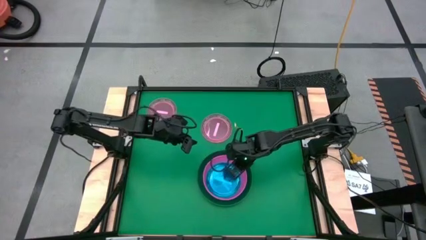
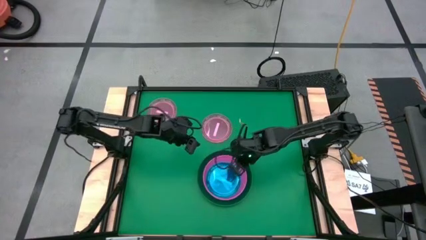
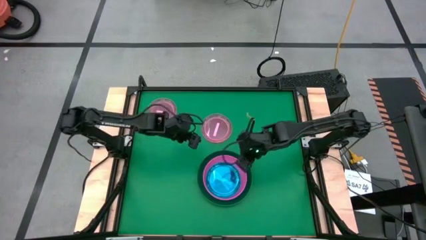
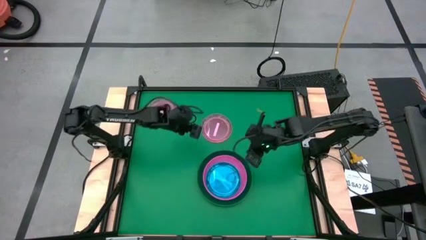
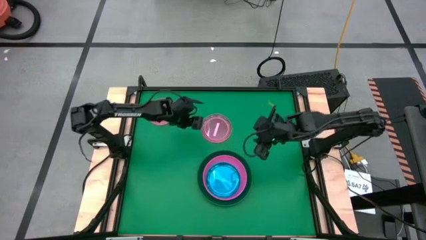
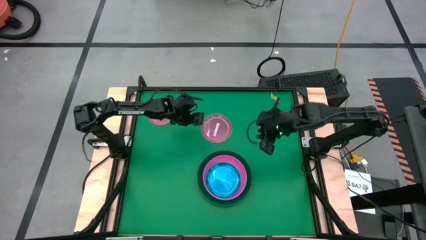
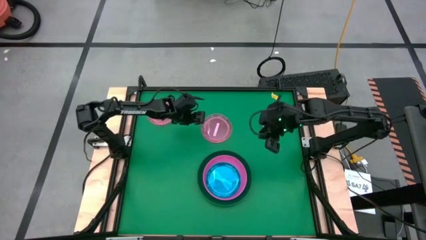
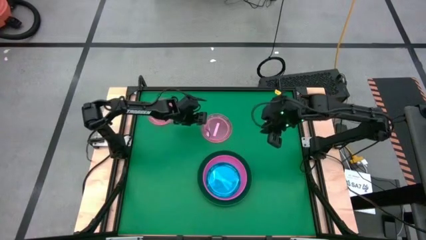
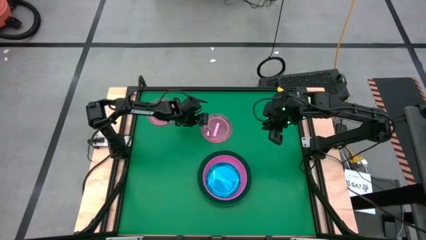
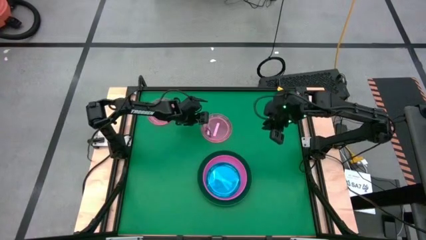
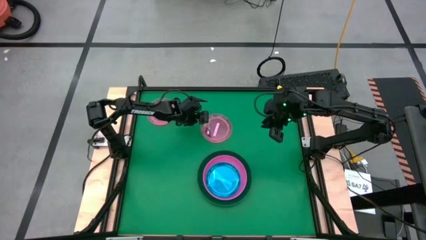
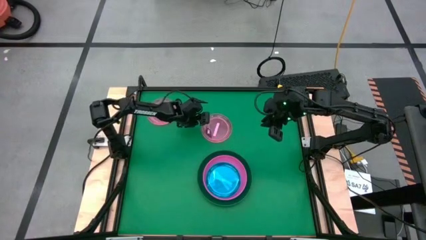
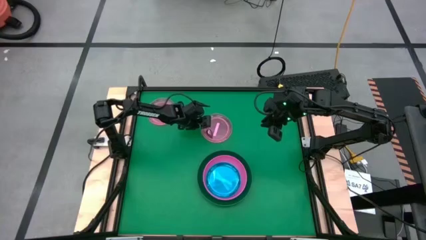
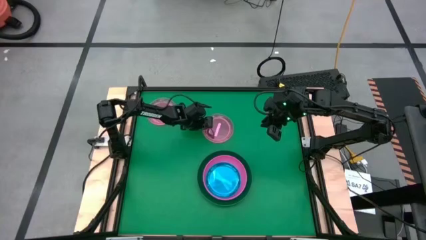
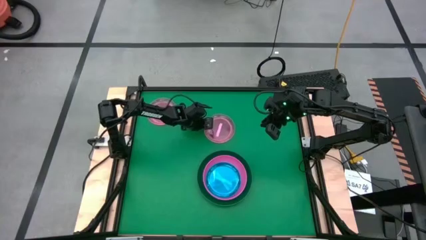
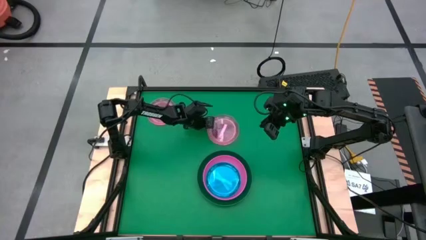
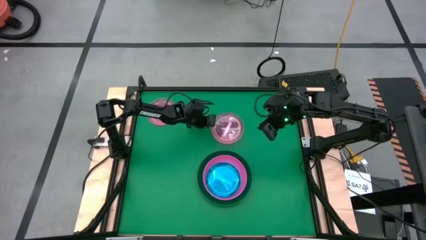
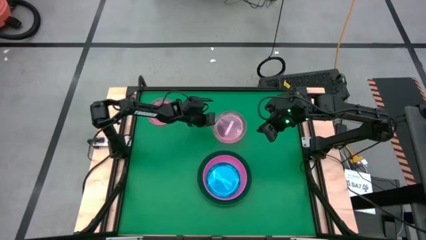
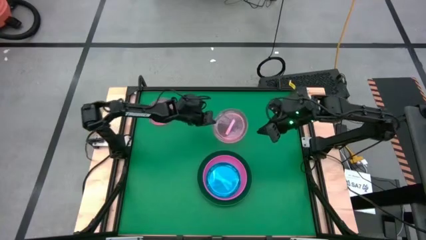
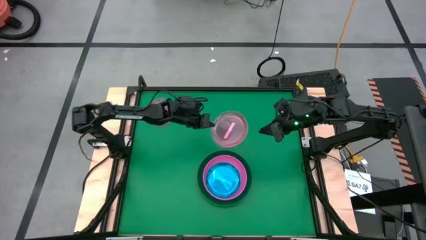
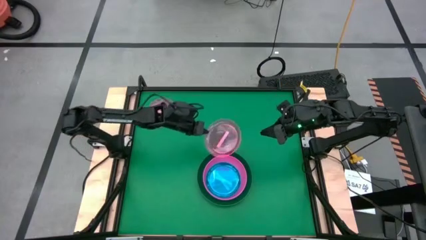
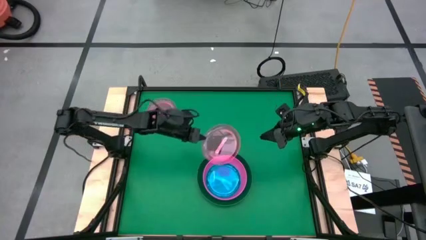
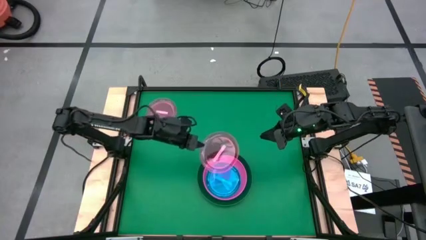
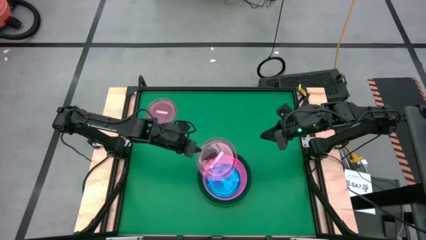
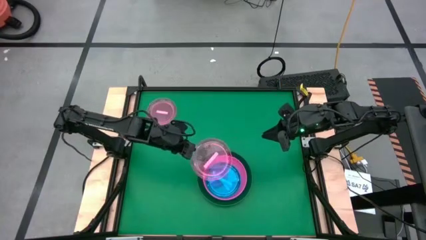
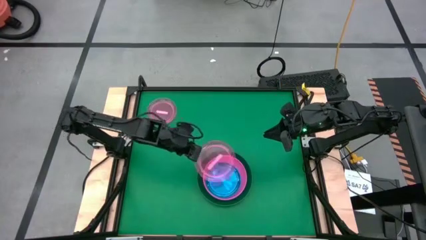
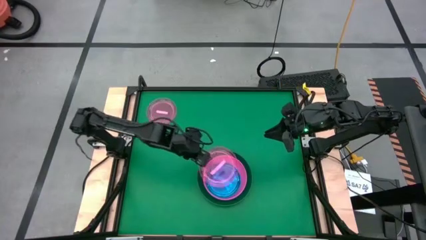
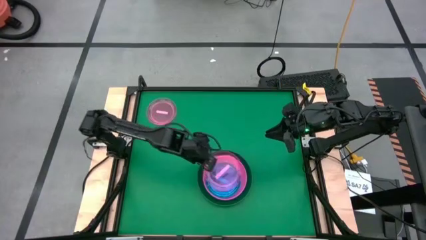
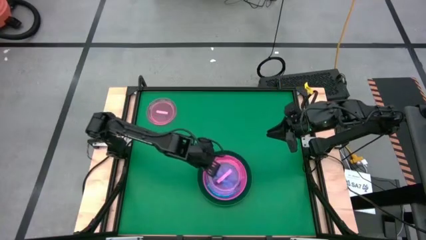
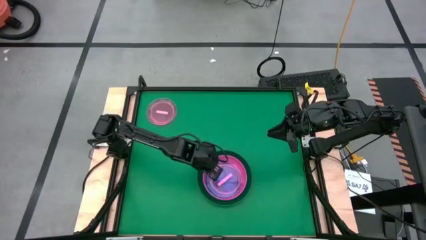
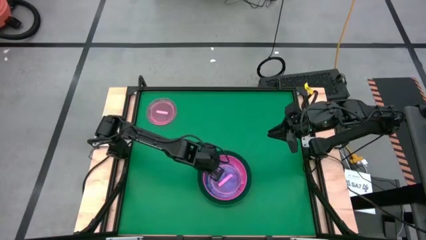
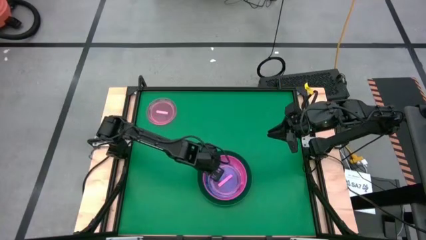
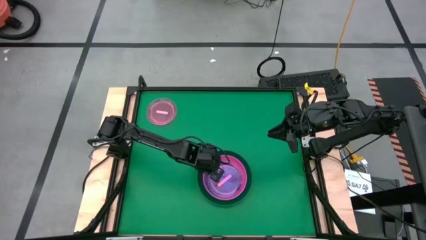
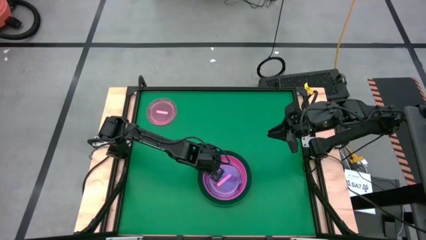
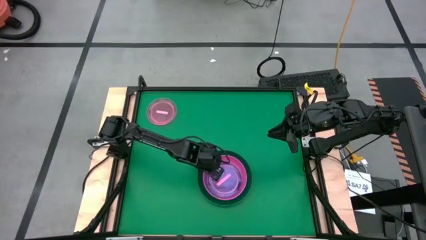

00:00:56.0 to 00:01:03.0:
Task: Stack plastic plates
Stack the right pink transparent plate on top of the blue transparent plate

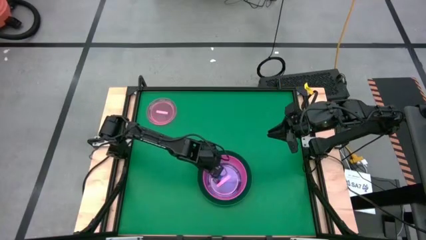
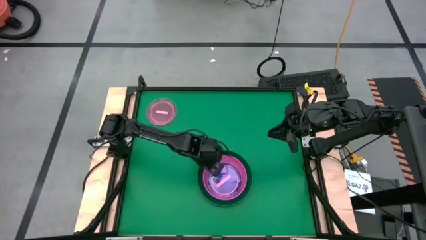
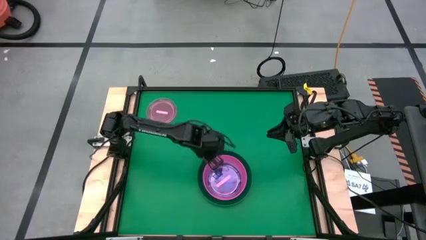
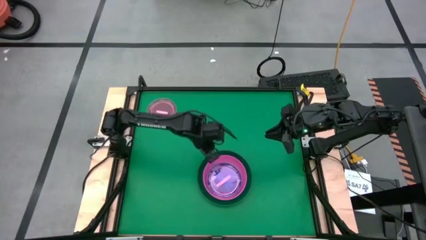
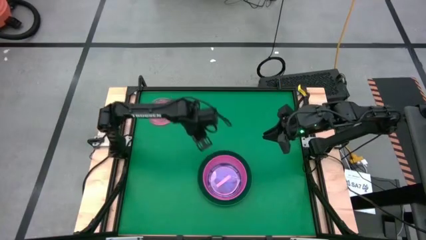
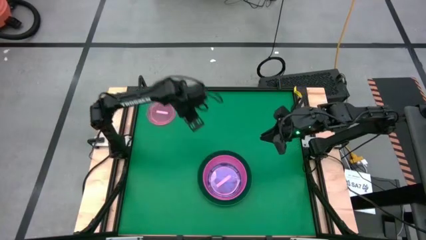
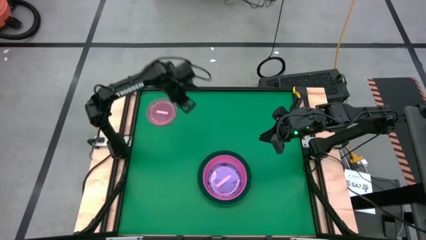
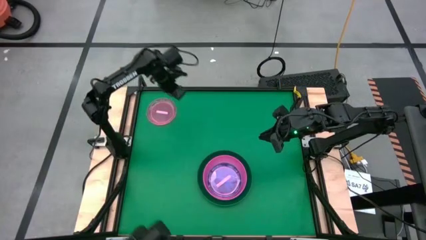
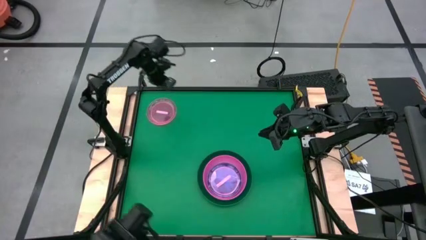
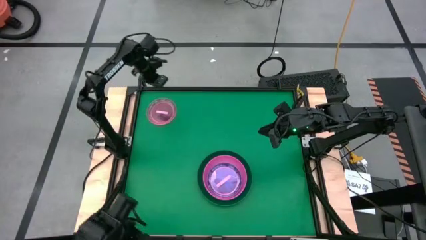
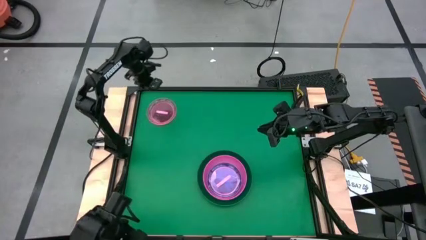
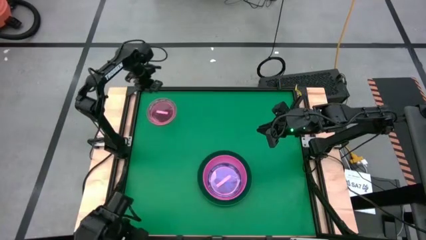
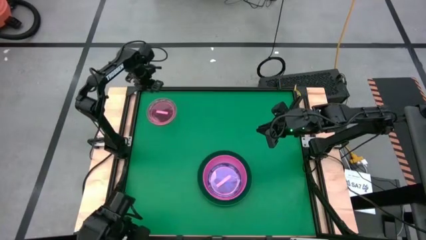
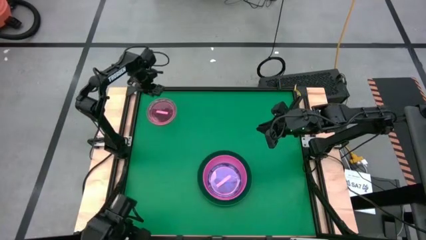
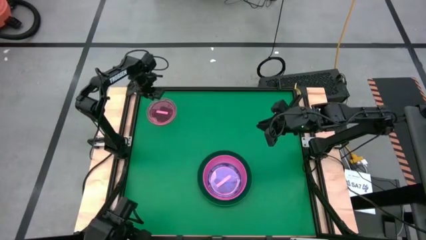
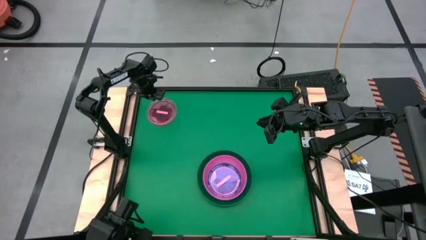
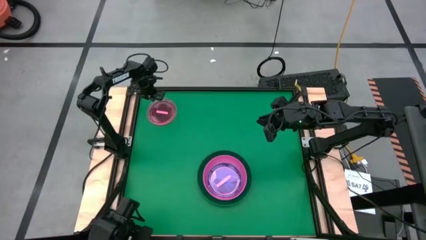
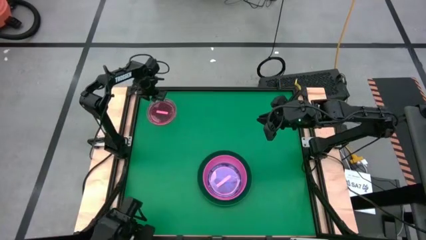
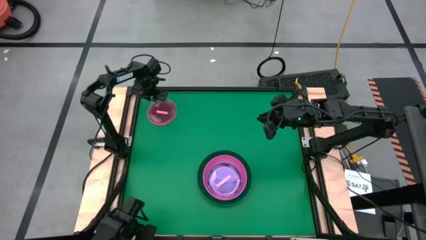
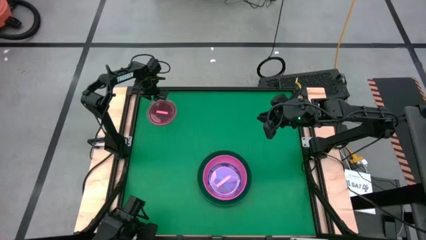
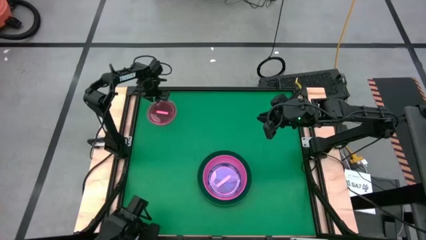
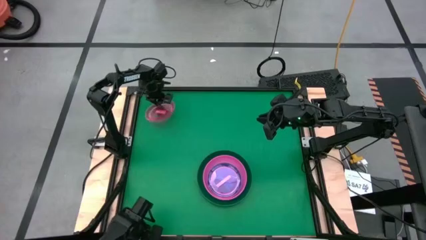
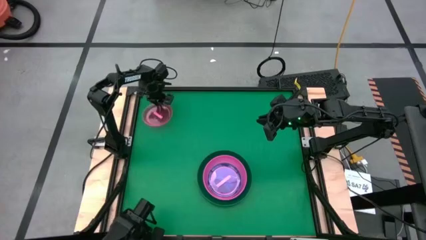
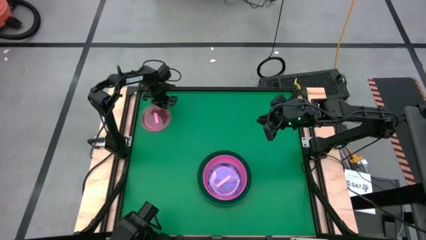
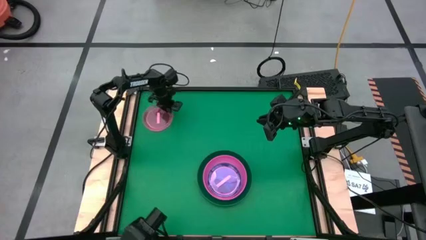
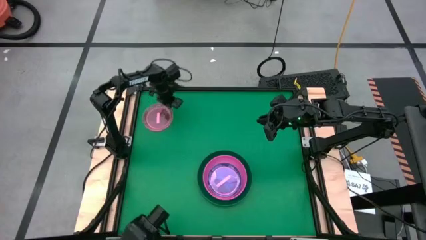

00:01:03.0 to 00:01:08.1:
Stack the pink transparent plate on top of the other pink transparent plate

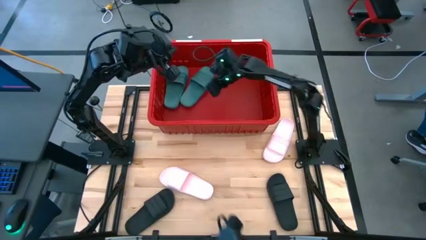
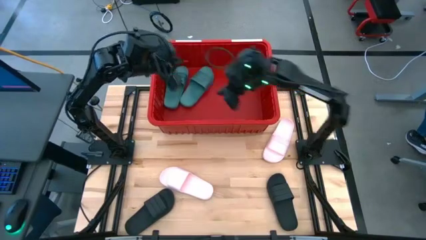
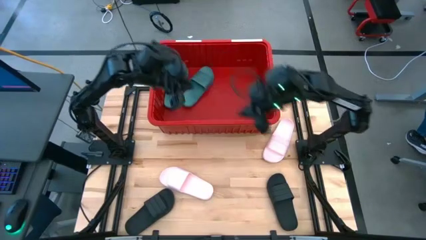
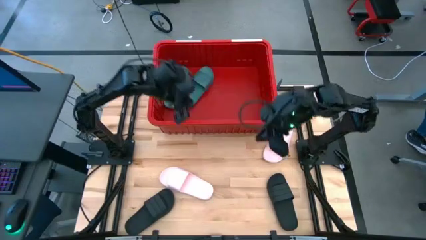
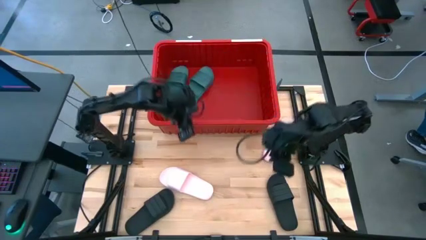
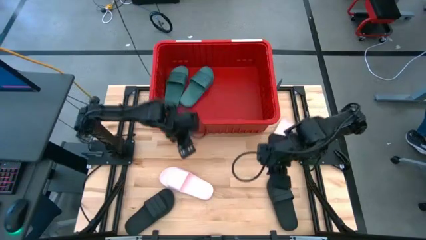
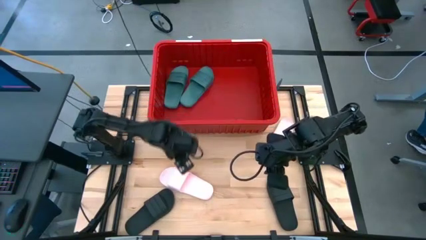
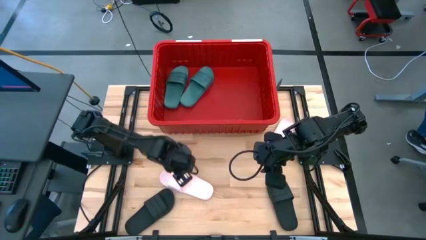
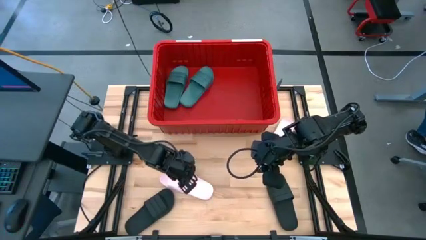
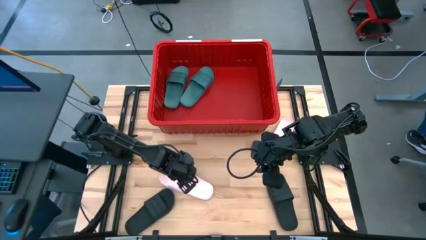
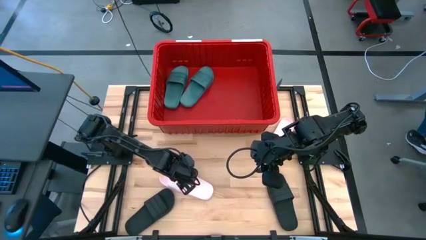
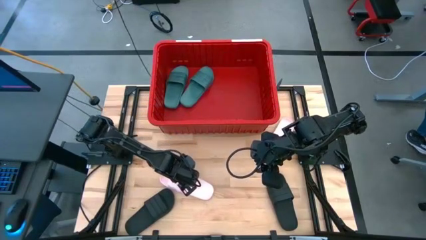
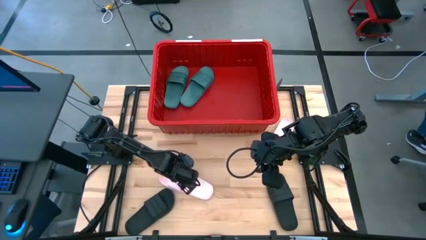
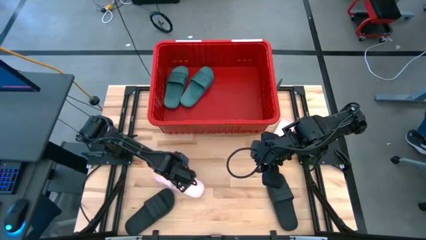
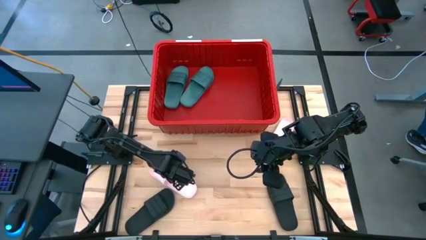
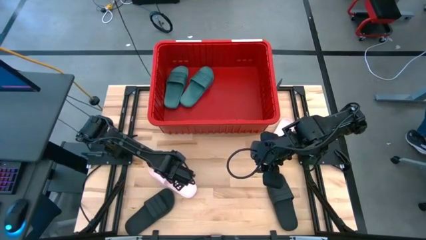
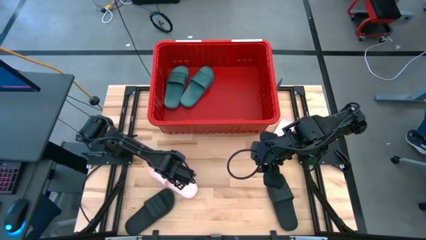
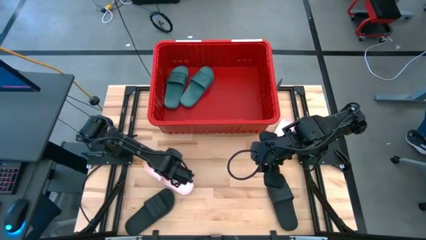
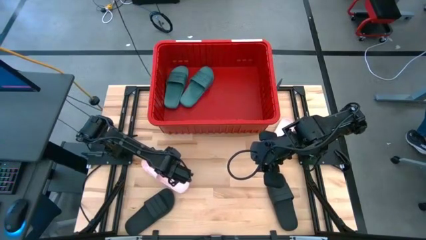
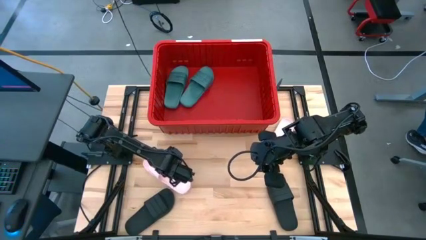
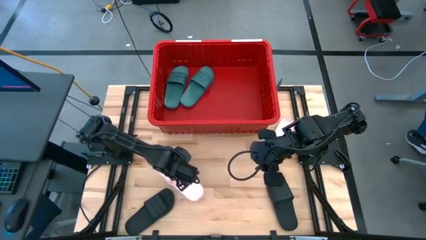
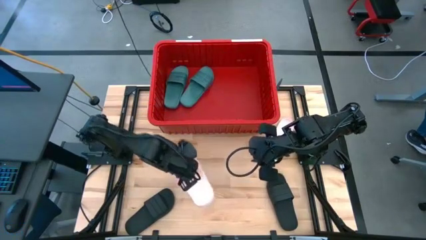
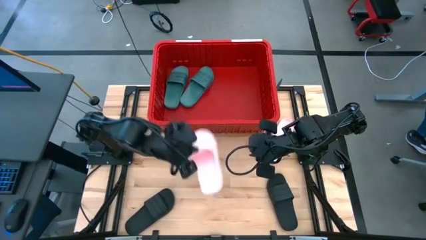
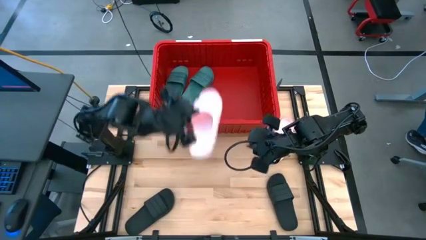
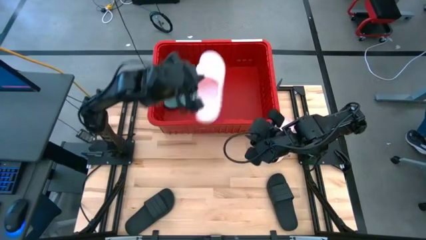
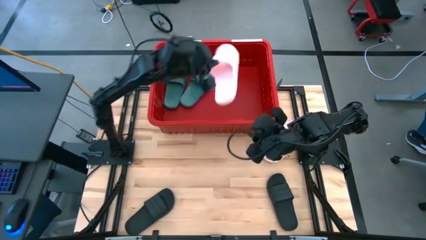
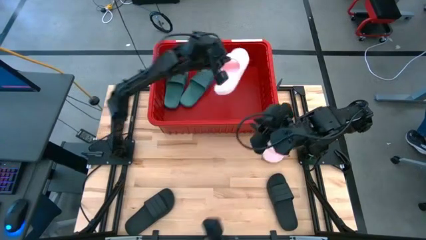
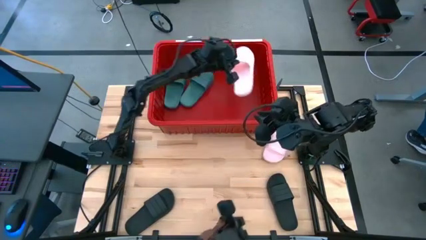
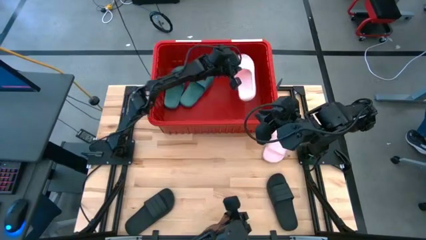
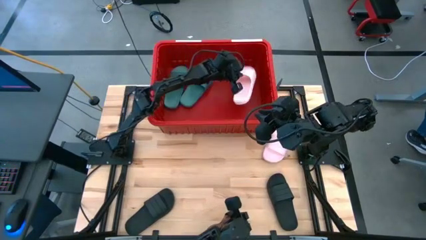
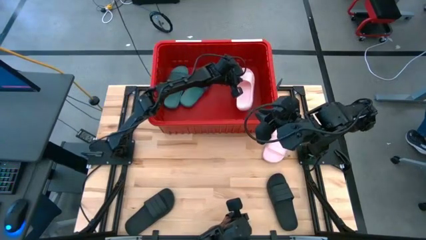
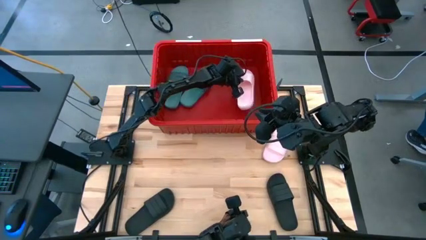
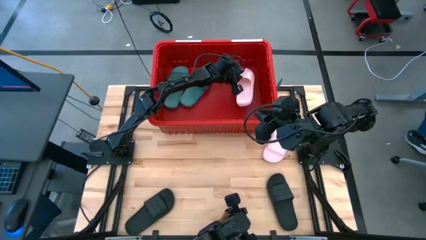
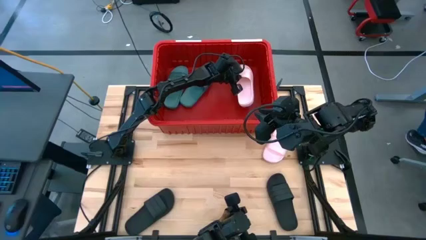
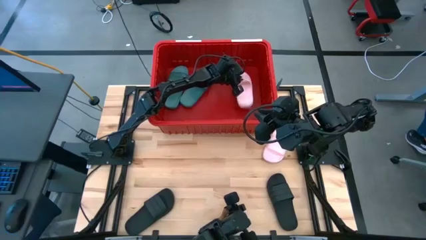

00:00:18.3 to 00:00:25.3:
Task: Pick and place slides into bin
Put the left pink slipper into the red bin
